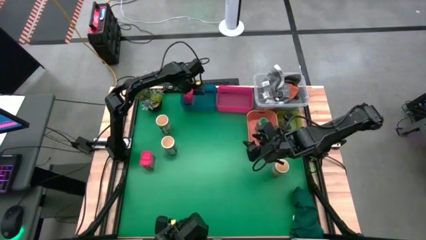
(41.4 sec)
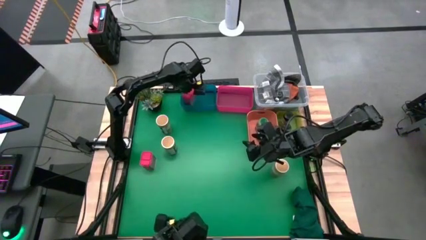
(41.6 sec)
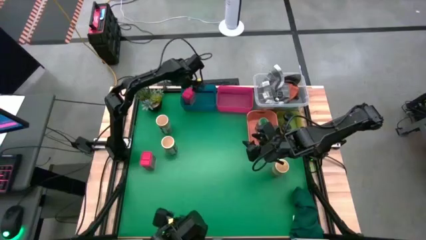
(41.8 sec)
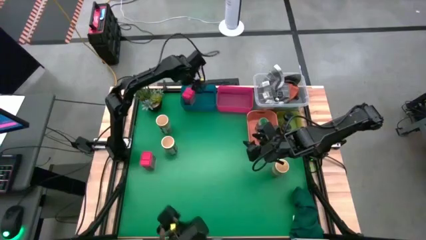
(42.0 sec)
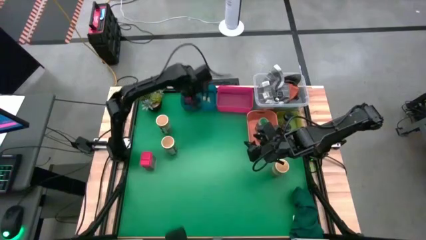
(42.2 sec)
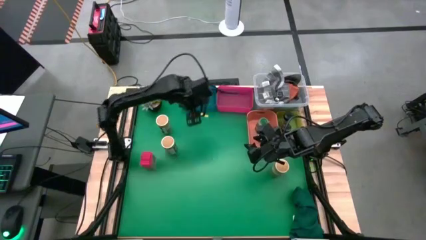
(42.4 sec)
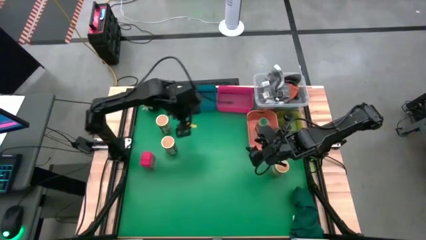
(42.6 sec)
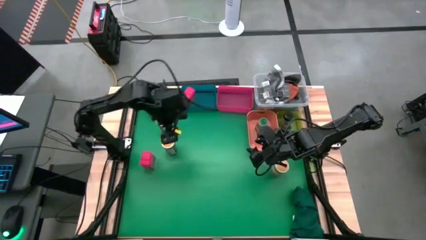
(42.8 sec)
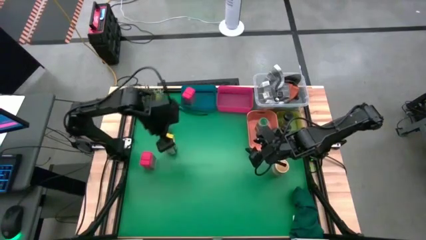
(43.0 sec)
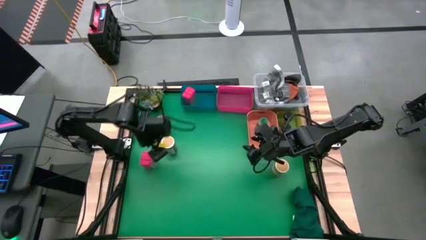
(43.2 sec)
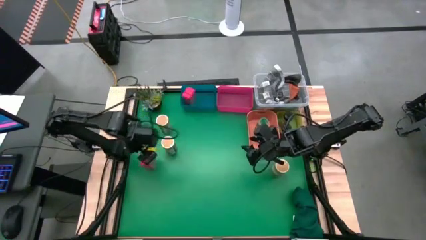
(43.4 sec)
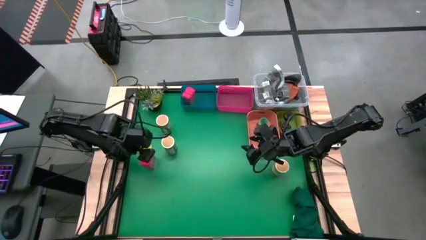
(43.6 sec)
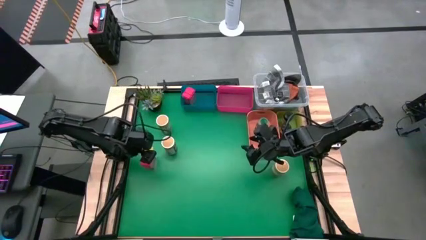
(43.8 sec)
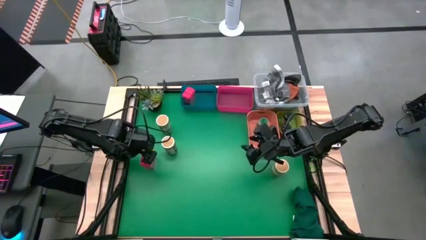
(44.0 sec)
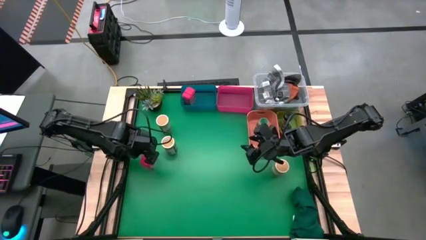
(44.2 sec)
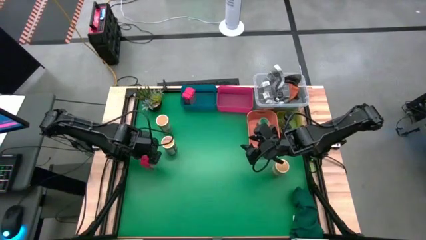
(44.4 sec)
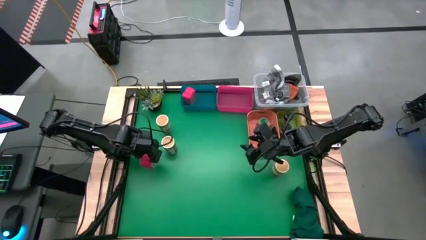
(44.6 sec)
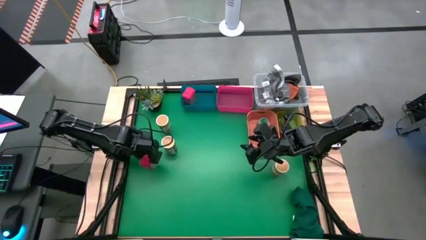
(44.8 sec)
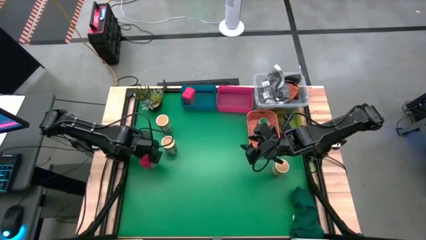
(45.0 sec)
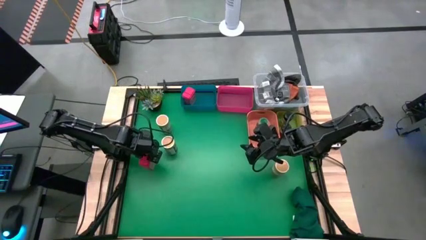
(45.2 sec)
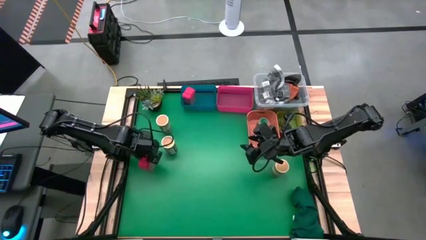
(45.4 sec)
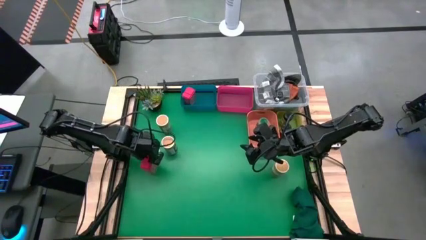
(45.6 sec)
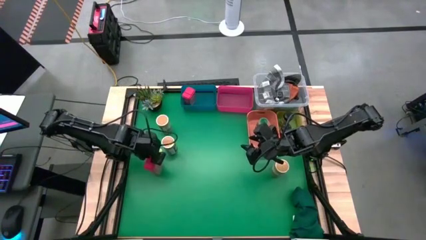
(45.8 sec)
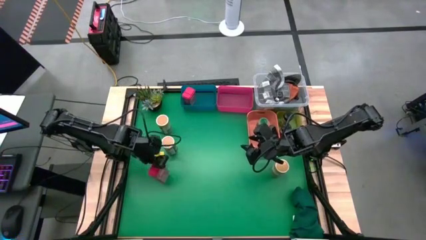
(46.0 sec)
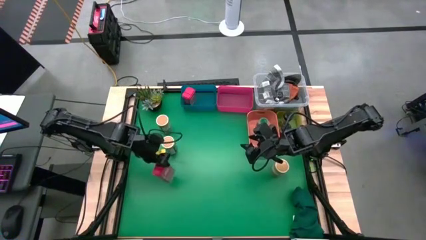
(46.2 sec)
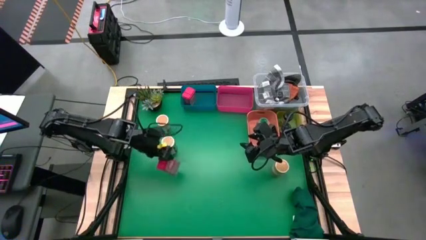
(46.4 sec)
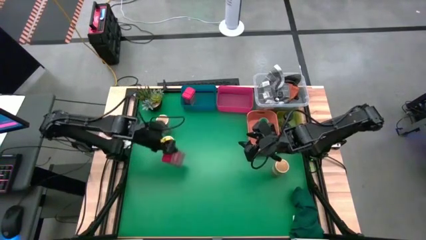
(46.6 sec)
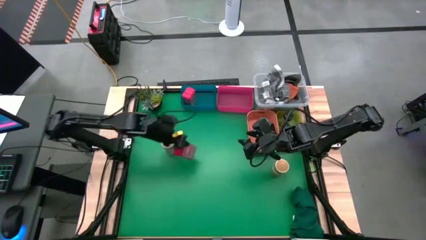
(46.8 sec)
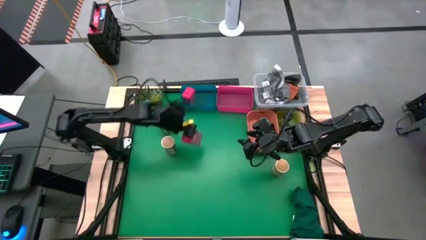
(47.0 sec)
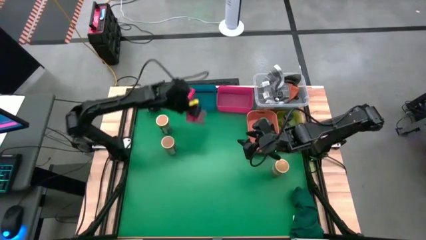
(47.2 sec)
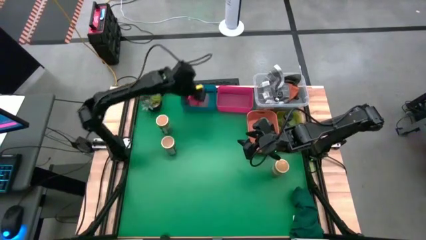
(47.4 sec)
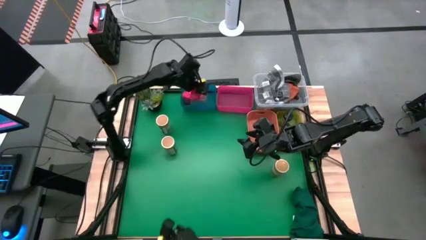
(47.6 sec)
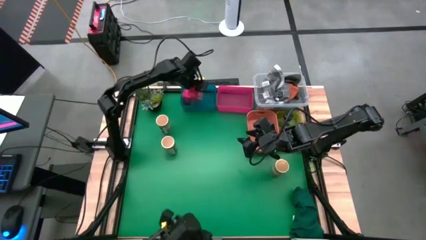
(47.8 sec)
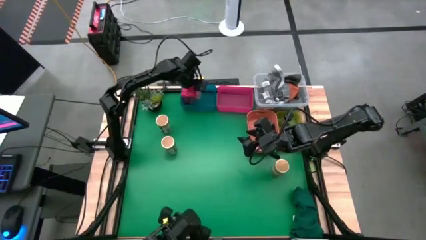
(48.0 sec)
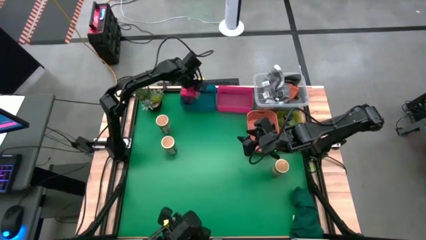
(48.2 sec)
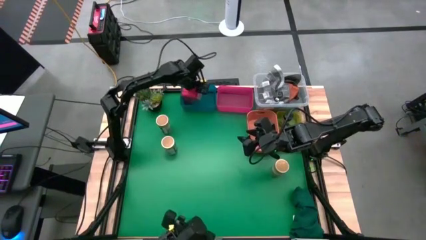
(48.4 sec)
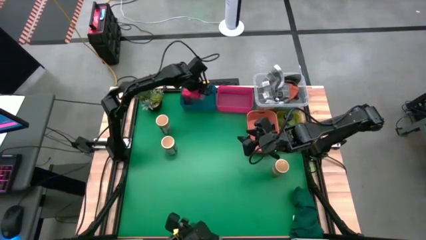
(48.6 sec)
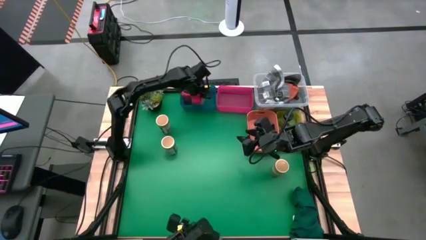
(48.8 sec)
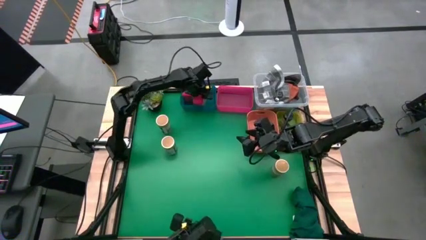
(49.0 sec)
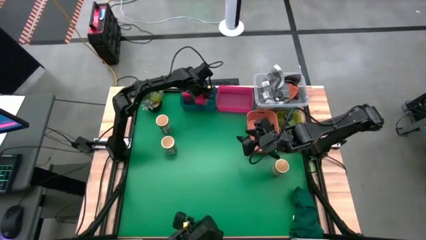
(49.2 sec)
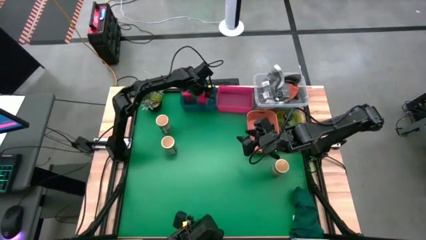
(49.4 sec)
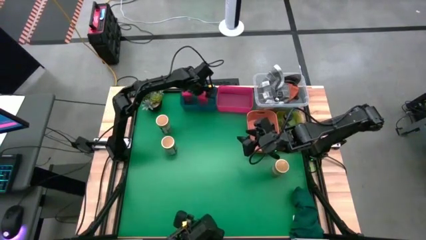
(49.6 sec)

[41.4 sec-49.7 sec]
Task: Sort spices by type
Put the red seasoning can into the blue bin

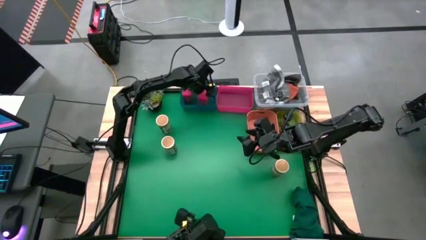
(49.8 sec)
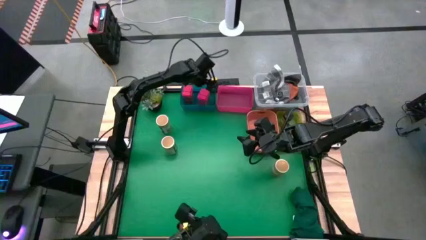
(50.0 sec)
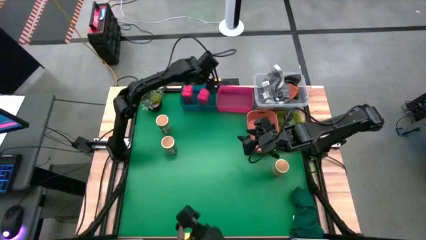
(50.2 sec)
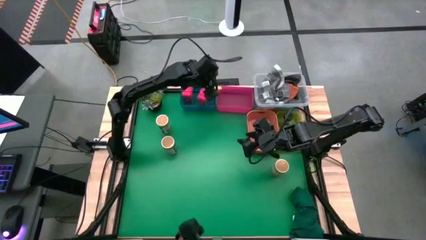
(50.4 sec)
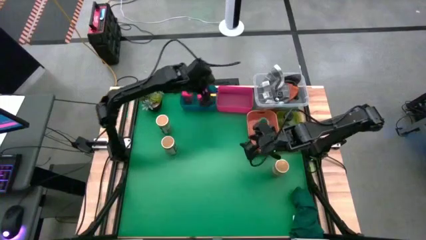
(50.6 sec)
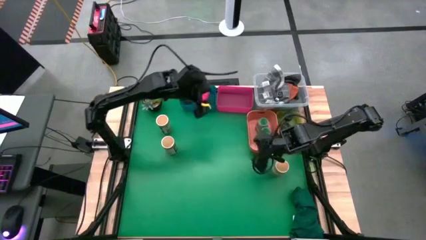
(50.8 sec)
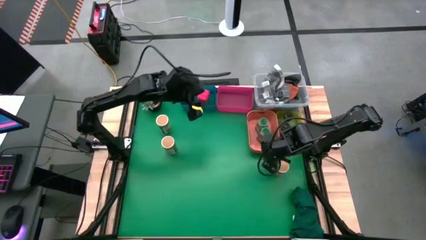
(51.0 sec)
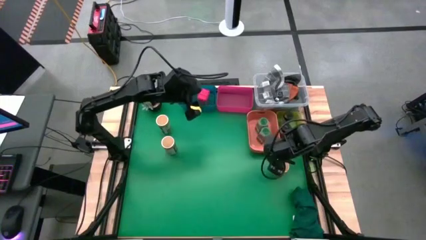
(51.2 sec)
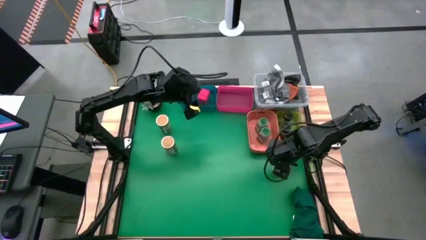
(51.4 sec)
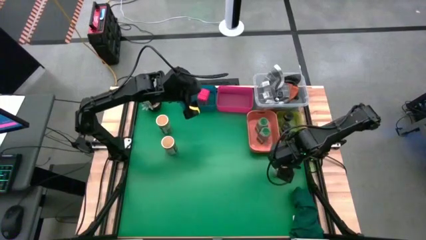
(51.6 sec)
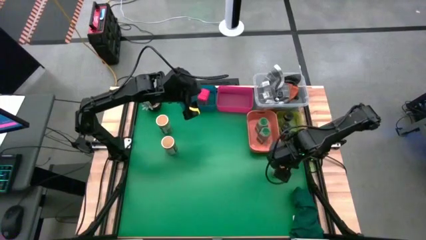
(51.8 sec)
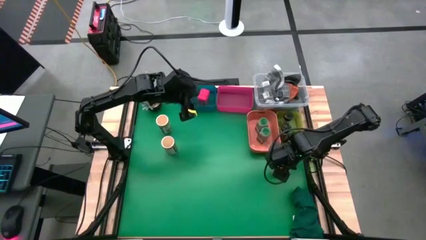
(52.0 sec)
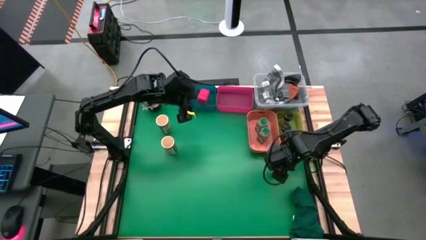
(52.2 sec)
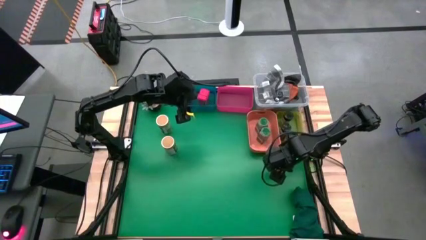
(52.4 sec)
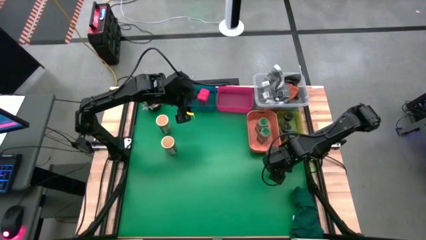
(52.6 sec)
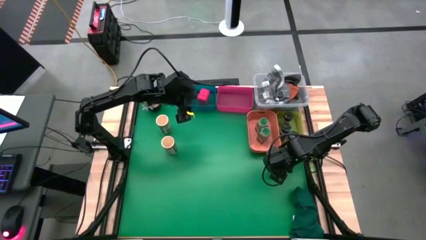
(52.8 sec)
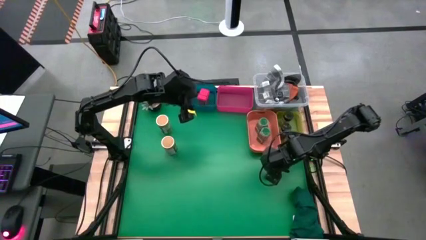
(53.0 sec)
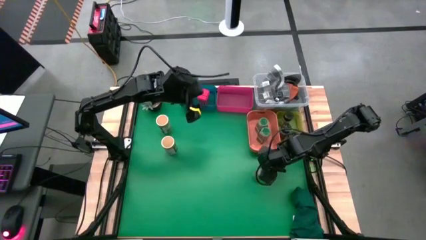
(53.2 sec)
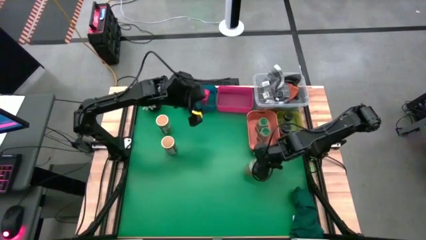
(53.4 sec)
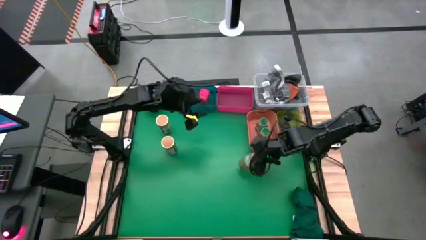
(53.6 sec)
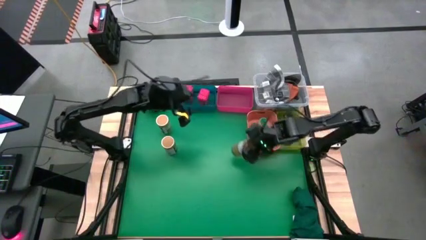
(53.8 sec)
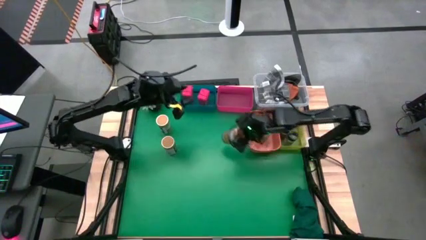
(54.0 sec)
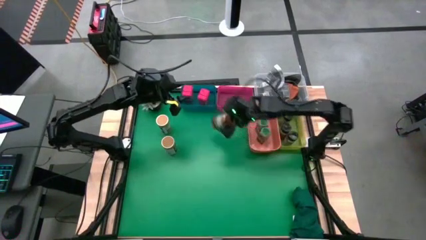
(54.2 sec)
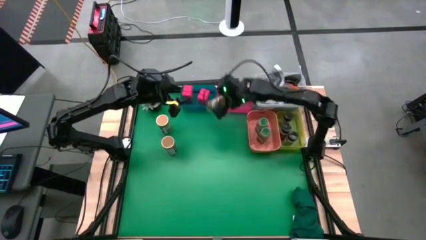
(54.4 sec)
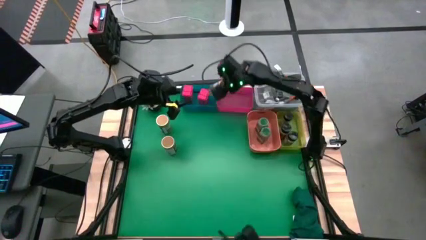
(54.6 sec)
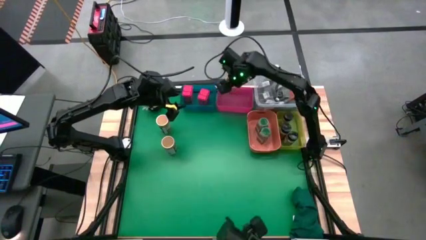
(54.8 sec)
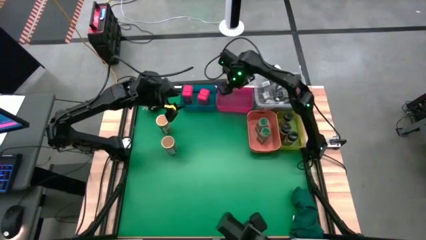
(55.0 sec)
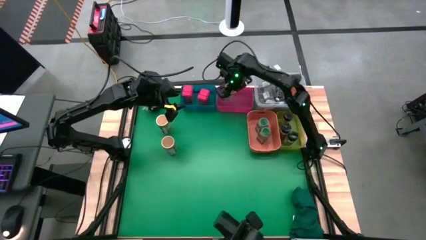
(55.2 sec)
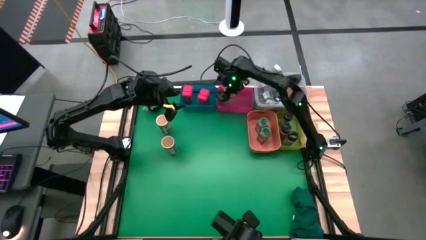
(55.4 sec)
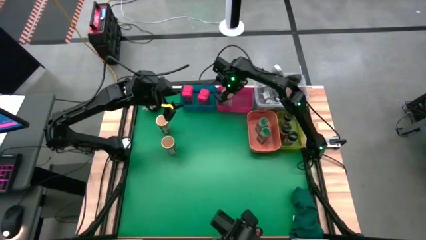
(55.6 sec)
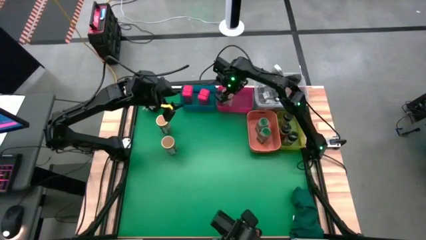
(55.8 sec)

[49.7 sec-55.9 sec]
Put the bottom brown seasoning bottle into the red bin
